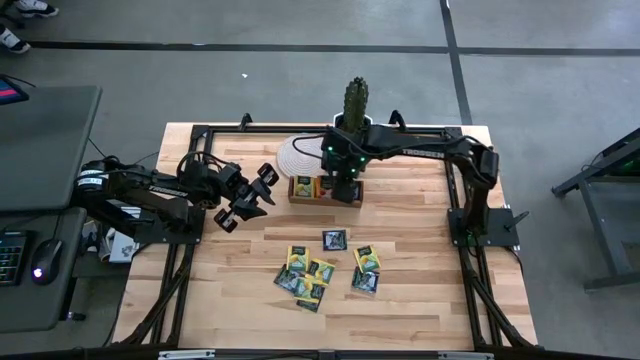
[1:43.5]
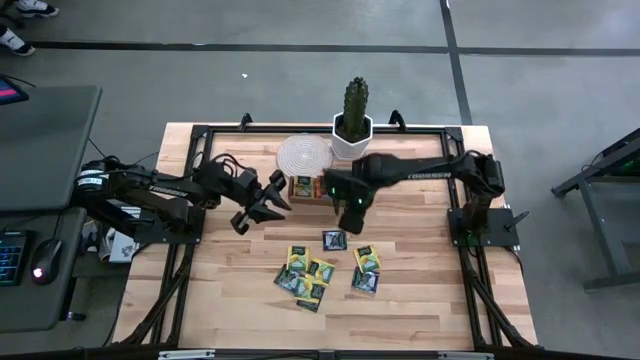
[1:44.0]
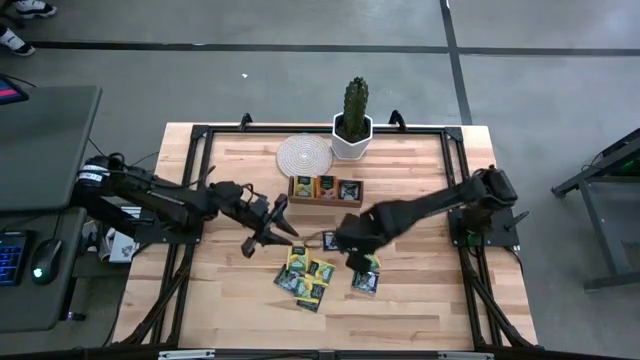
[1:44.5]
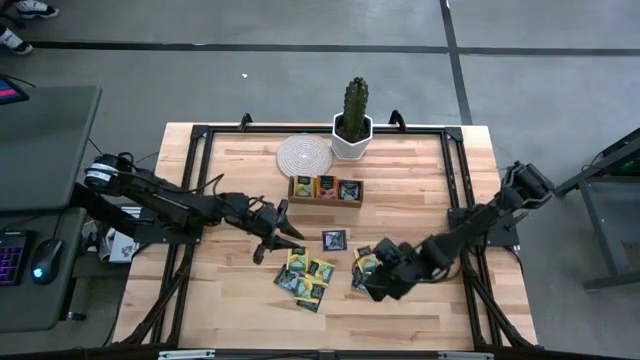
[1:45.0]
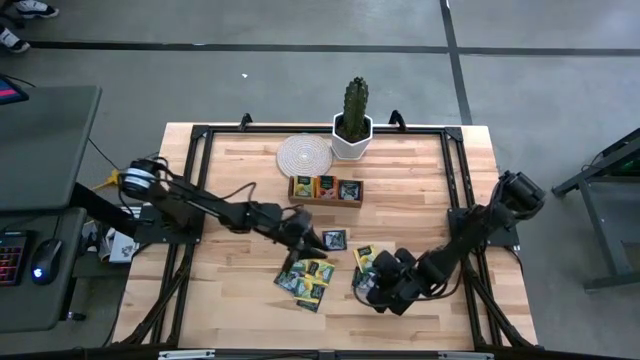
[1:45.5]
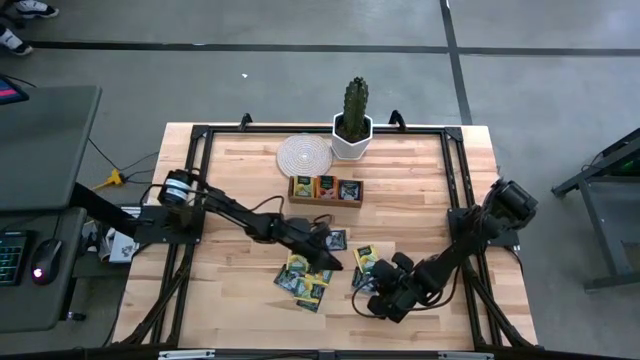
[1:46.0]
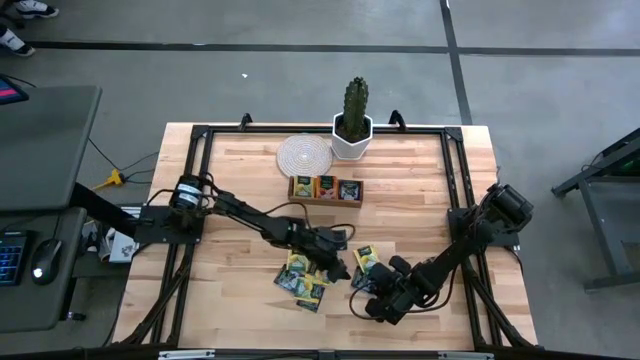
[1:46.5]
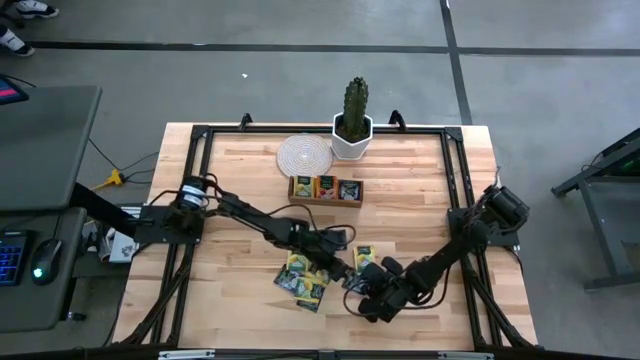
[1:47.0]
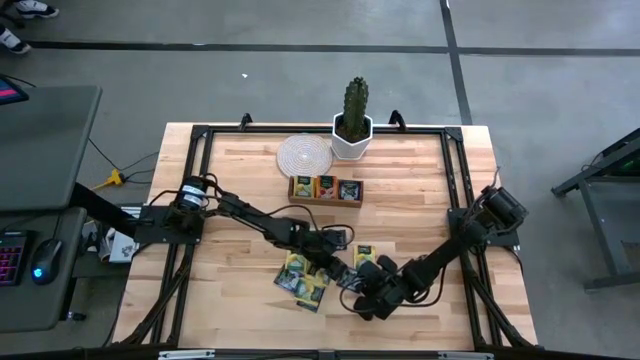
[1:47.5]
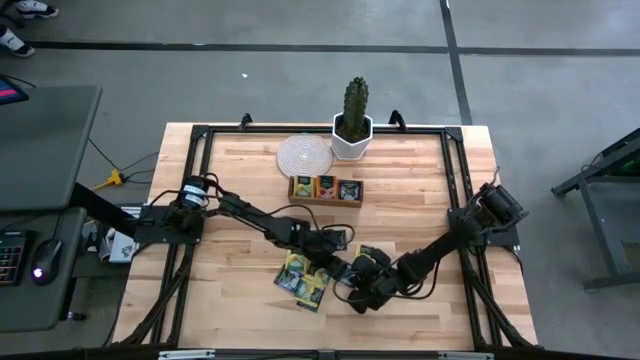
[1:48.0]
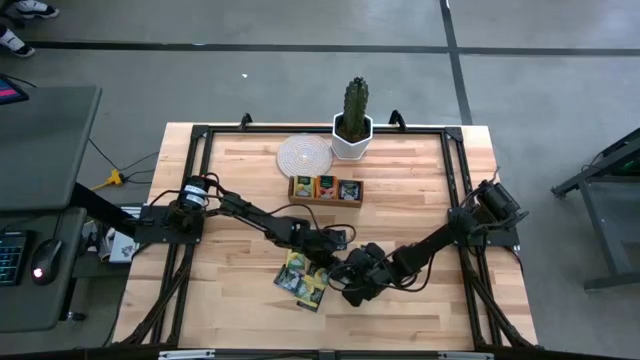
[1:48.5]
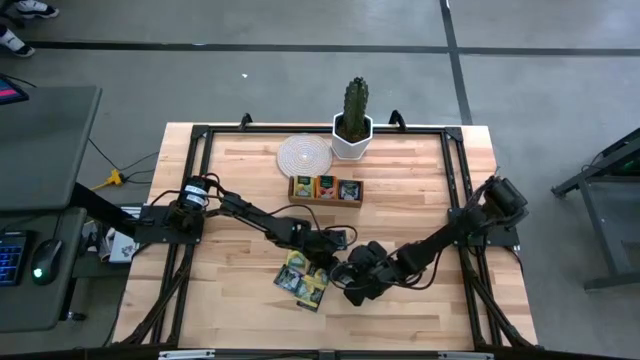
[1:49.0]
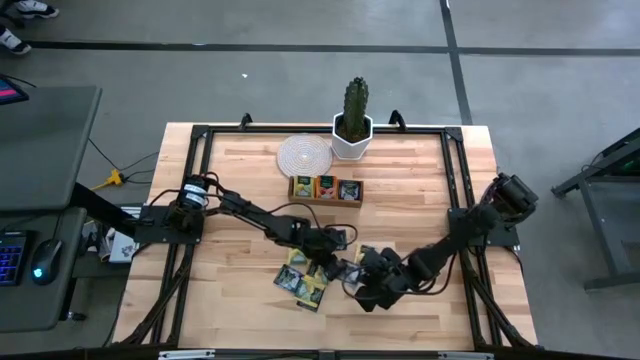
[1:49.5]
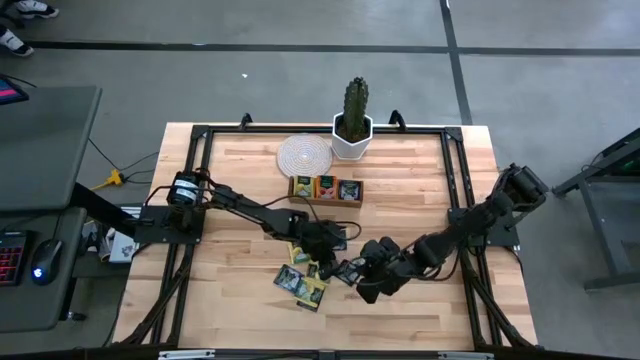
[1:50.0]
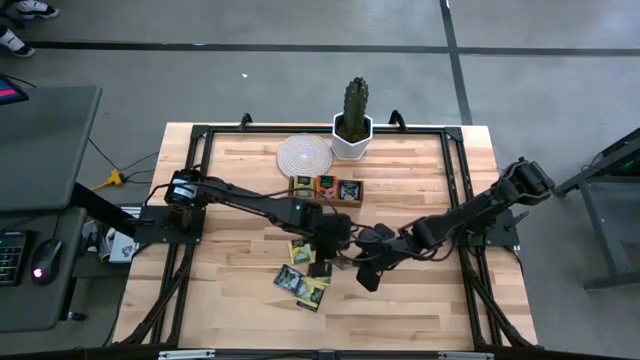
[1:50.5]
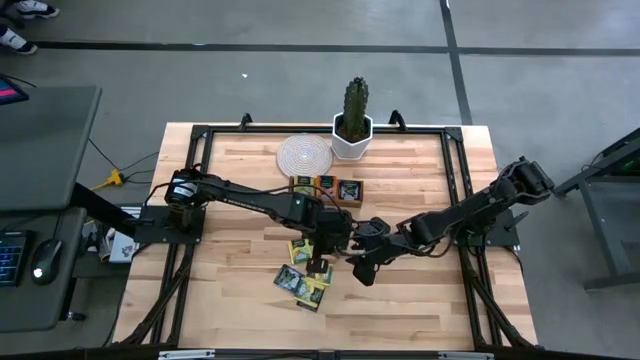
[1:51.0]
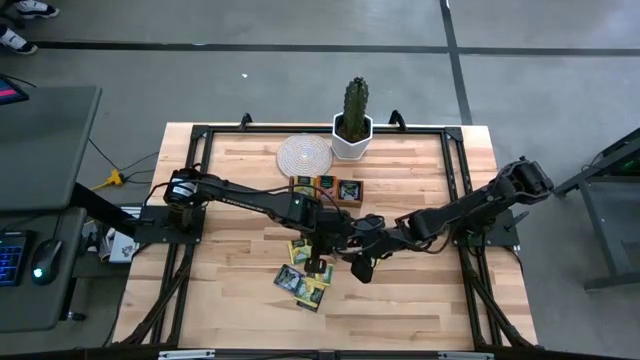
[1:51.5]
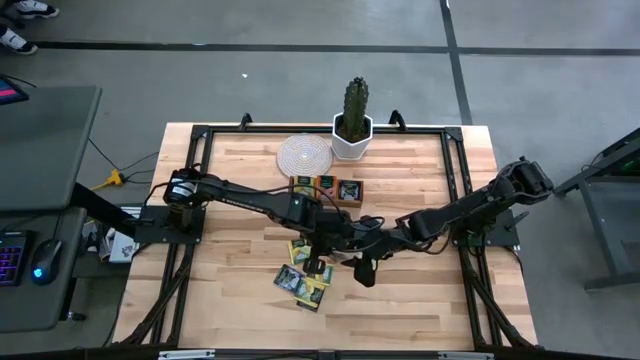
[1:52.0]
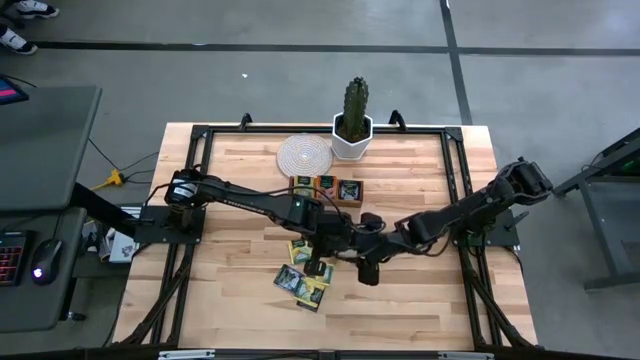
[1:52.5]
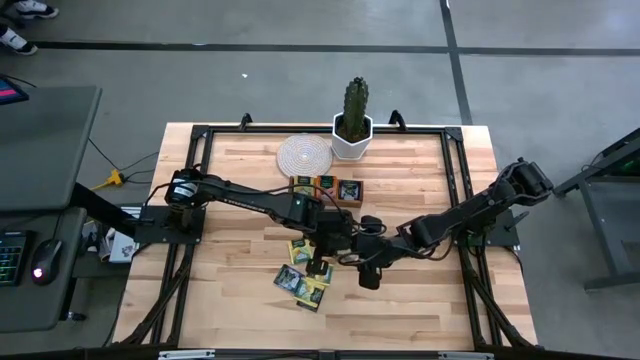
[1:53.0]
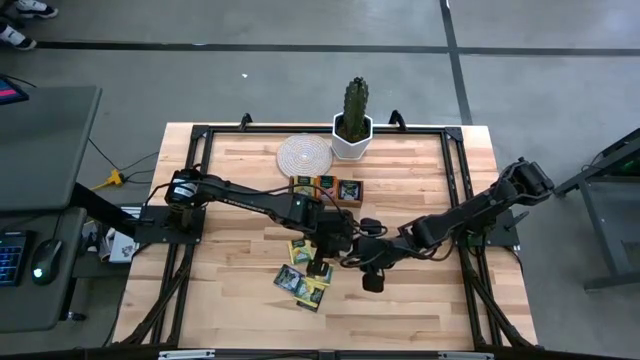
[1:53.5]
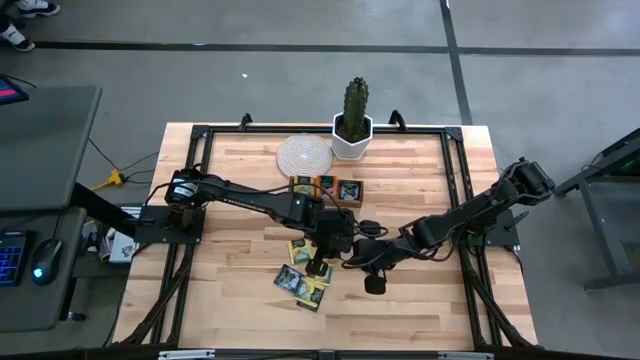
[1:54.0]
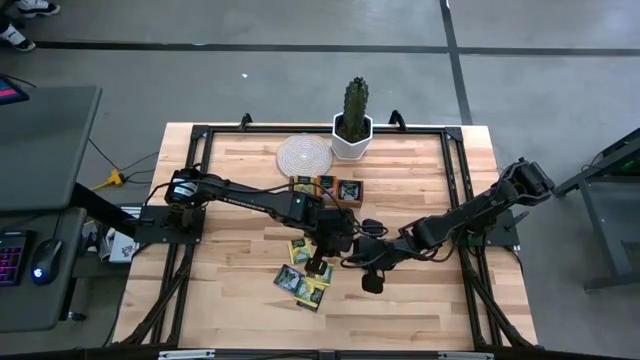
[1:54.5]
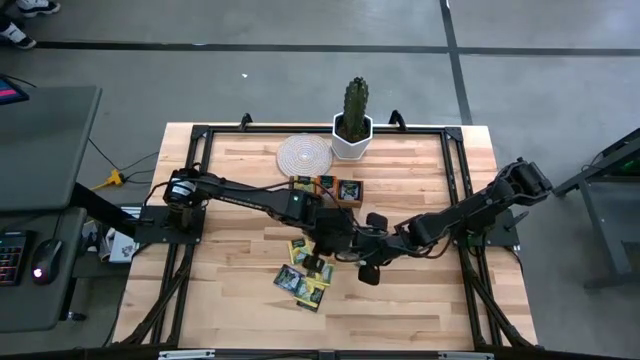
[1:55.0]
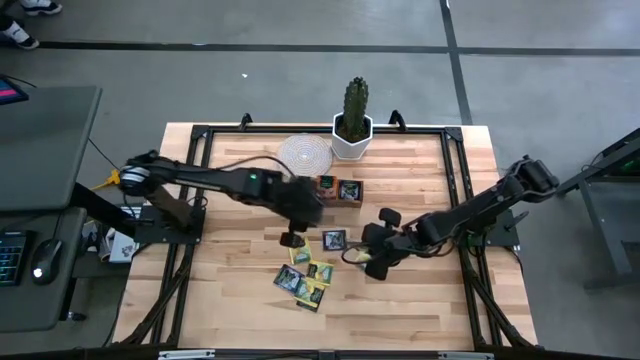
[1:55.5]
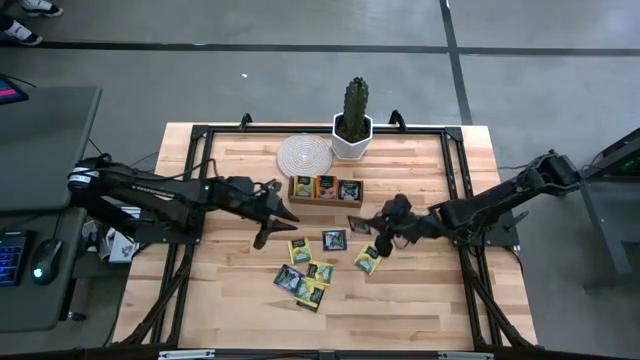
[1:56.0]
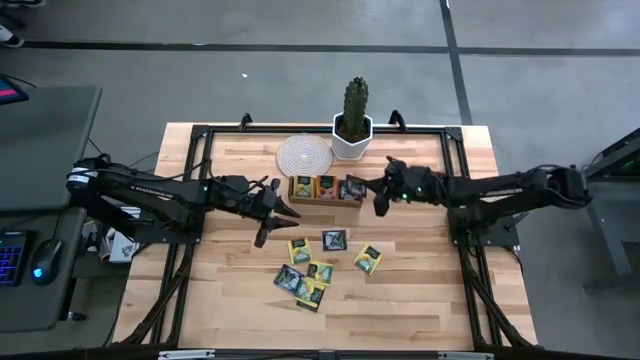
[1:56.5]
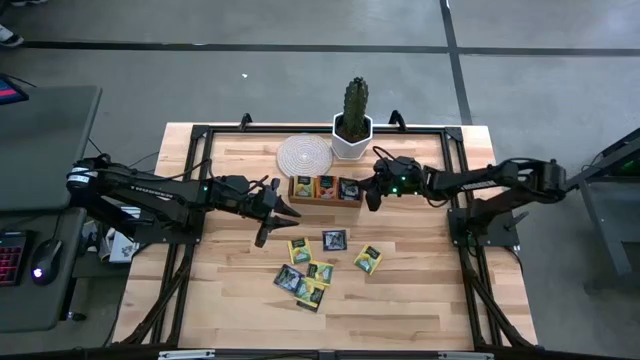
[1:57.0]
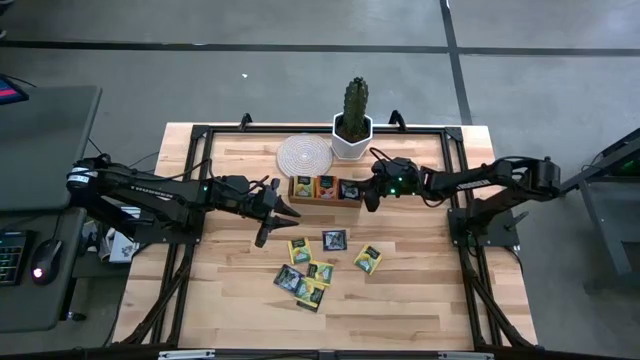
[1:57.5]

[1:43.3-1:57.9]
Task: Pick & Place Tea
Put the purple tea bag into the right section of the wooden organizer

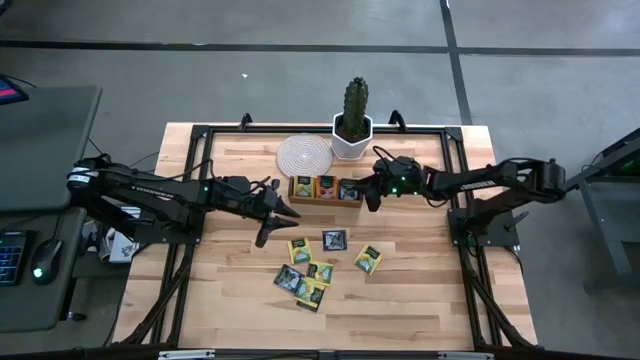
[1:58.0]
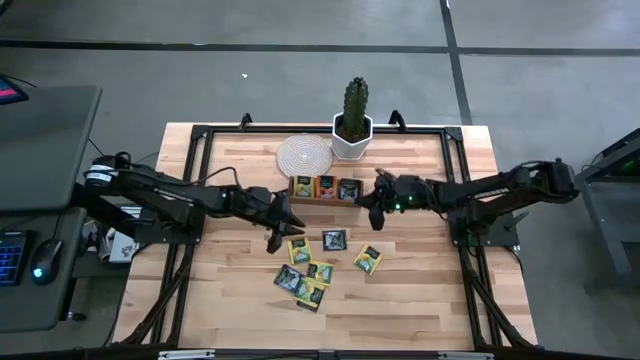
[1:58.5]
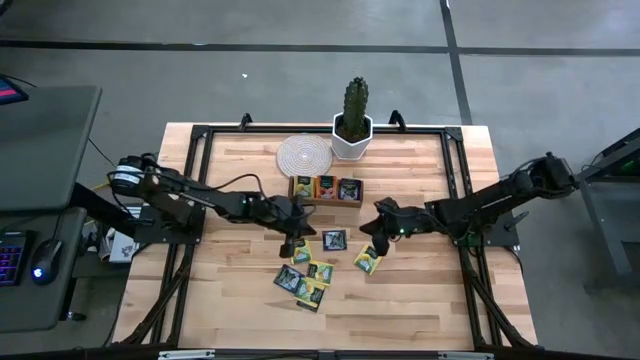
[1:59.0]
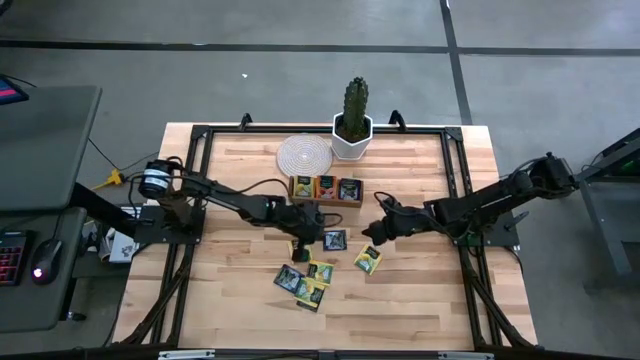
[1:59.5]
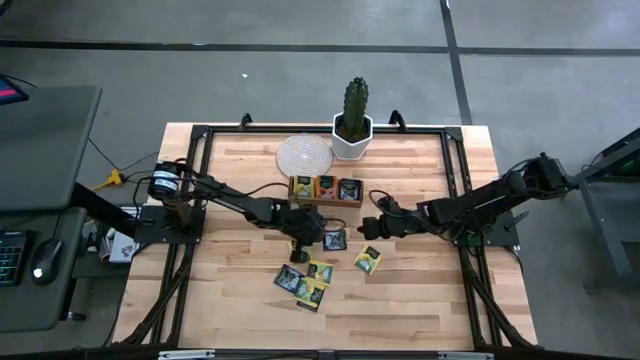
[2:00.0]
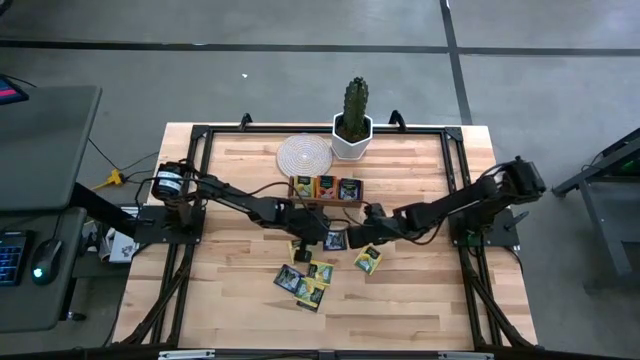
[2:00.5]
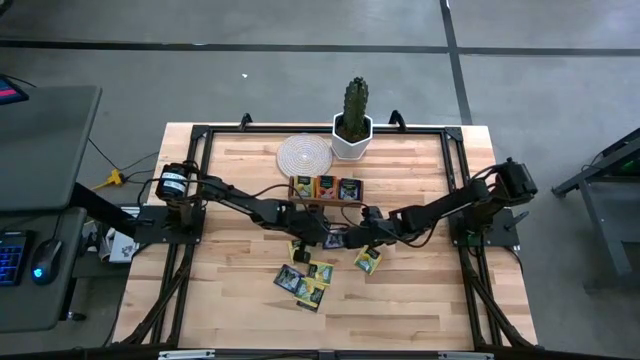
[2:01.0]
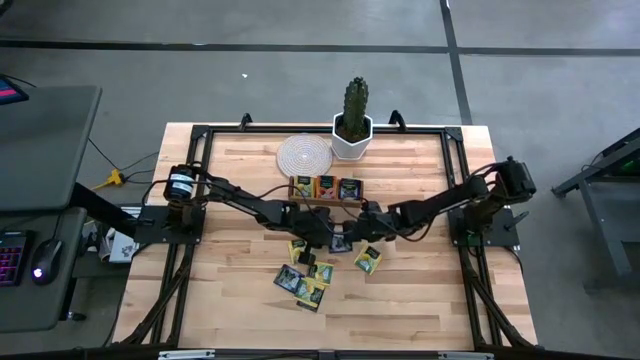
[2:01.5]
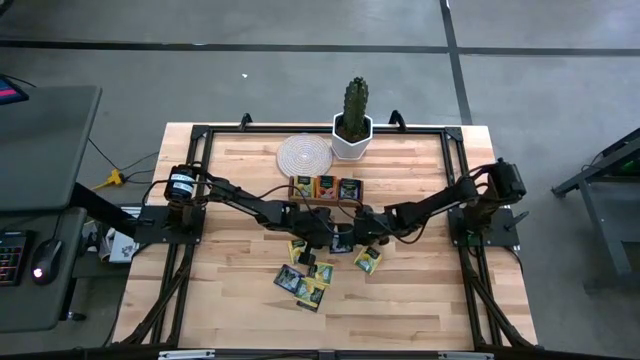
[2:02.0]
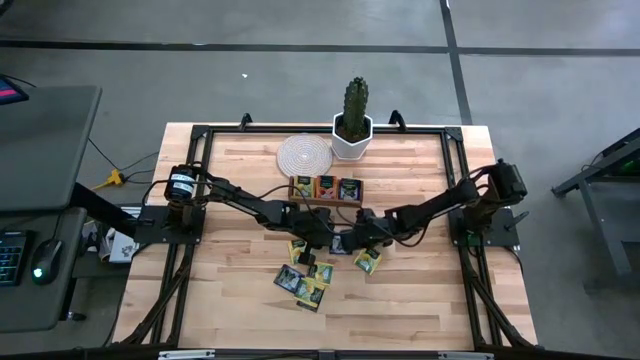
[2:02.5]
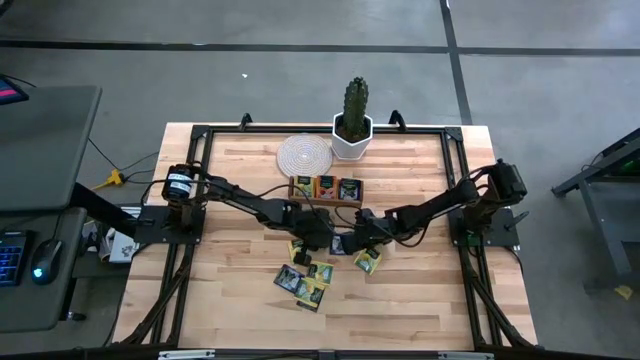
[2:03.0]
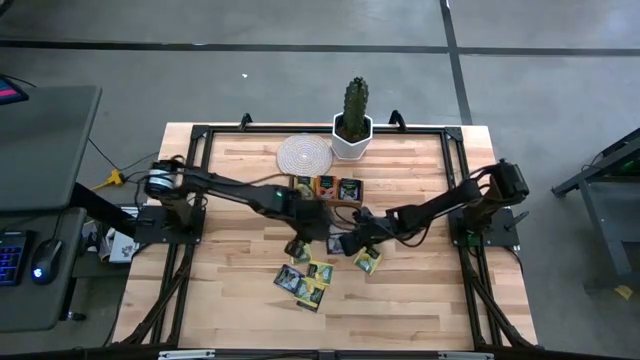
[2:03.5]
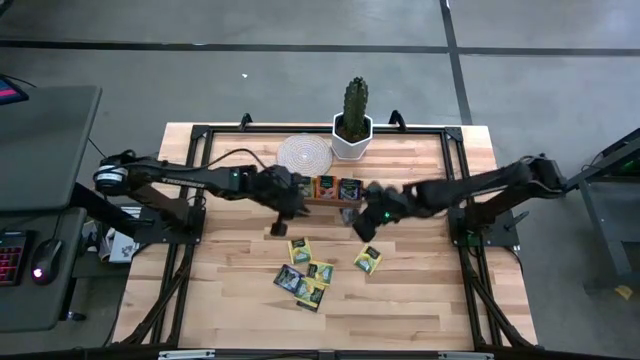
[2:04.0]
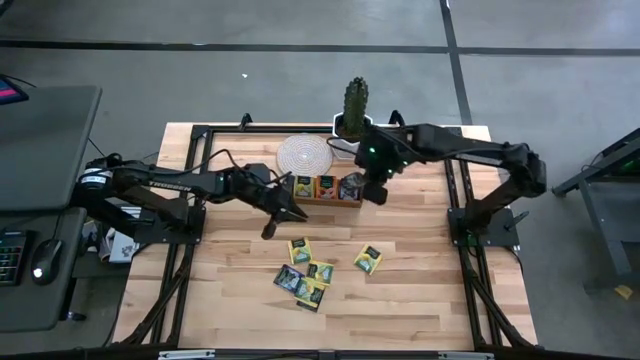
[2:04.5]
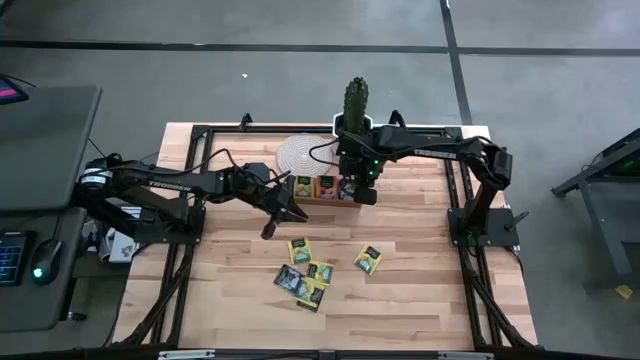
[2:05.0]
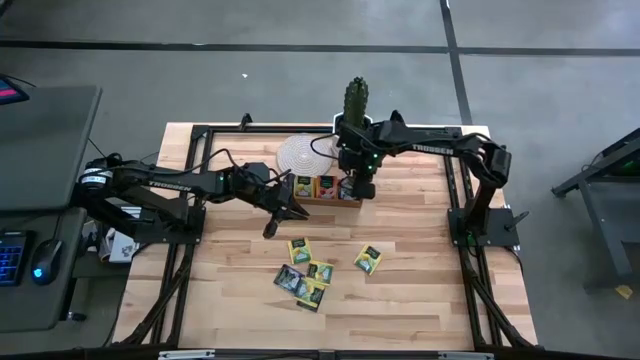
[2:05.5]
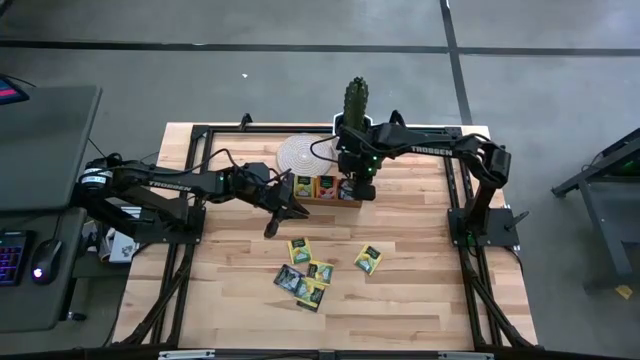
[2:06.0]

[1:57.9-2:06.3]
Put the purple tea bag into the right section of the wooden organizer
